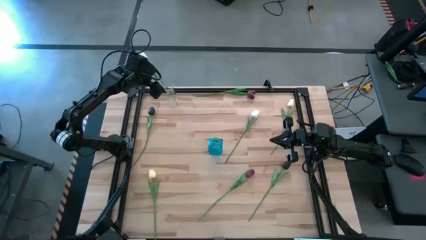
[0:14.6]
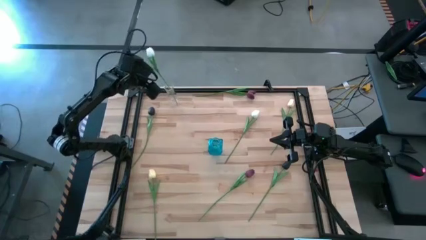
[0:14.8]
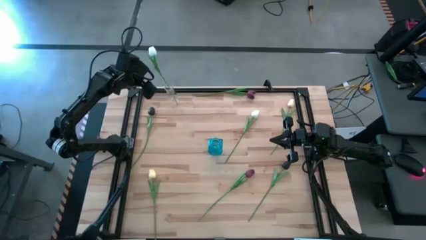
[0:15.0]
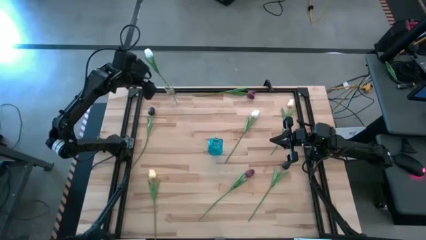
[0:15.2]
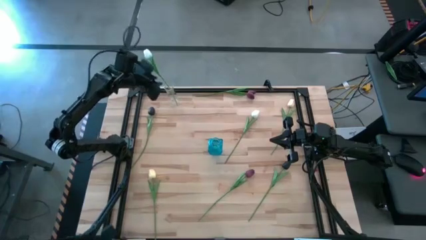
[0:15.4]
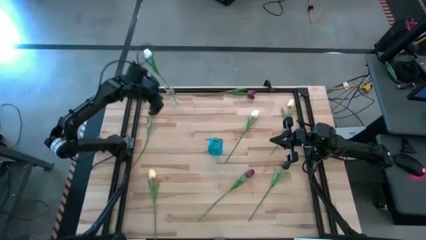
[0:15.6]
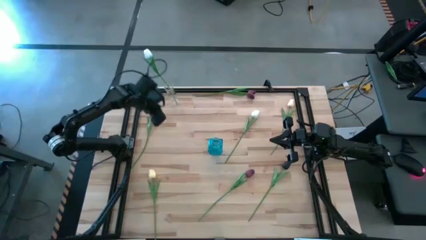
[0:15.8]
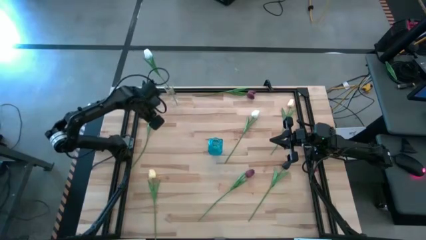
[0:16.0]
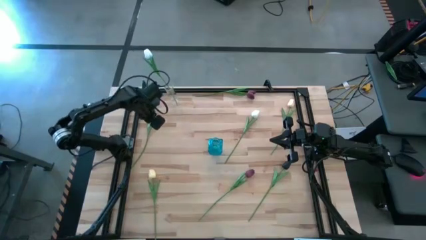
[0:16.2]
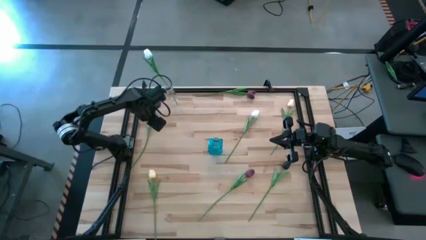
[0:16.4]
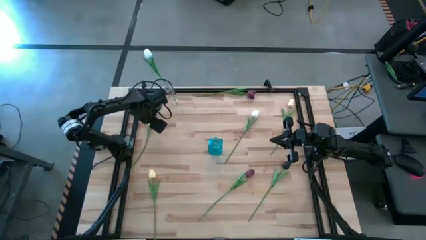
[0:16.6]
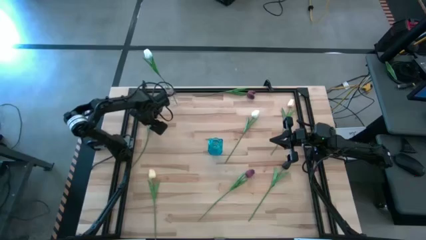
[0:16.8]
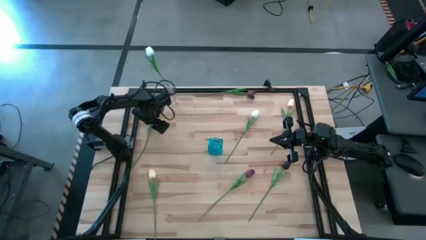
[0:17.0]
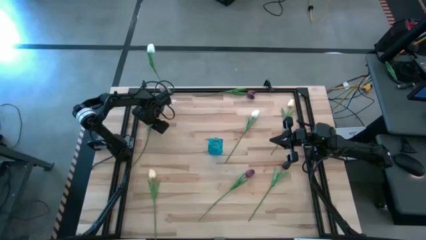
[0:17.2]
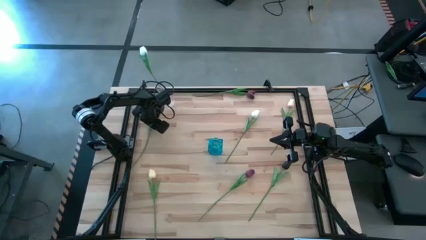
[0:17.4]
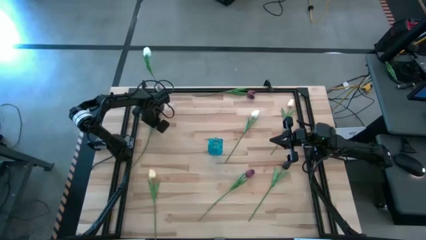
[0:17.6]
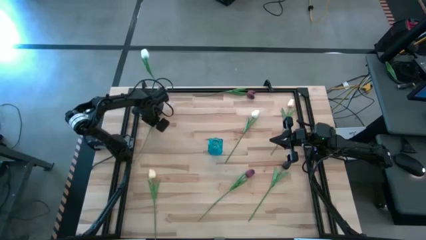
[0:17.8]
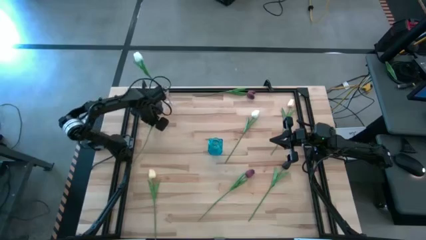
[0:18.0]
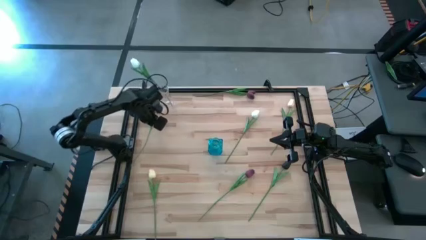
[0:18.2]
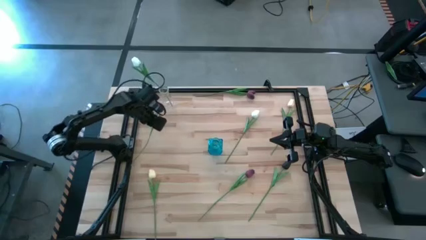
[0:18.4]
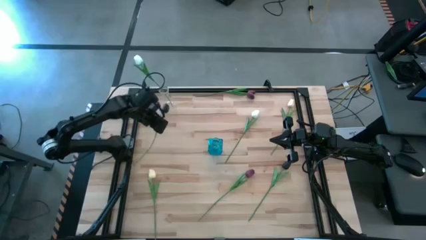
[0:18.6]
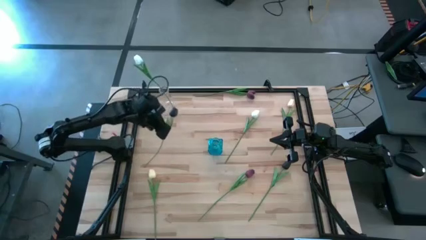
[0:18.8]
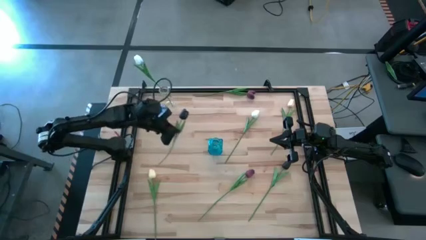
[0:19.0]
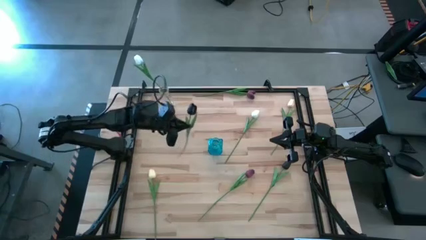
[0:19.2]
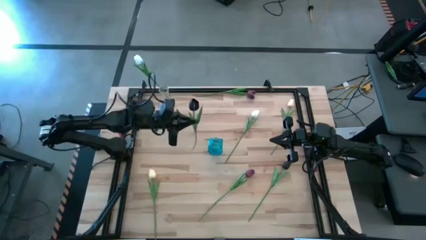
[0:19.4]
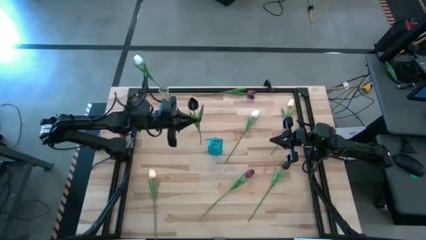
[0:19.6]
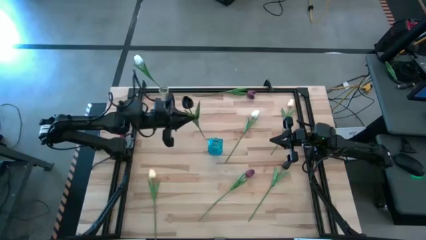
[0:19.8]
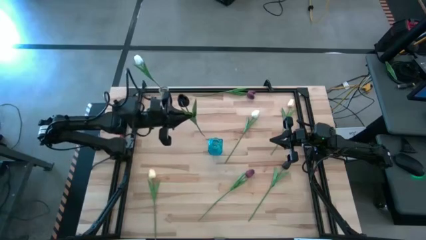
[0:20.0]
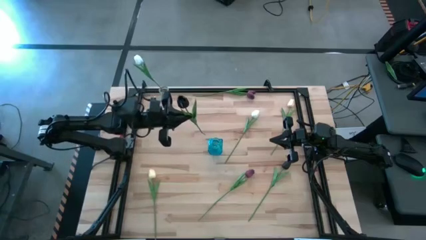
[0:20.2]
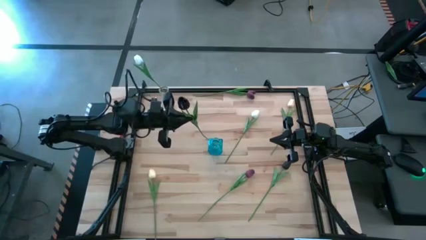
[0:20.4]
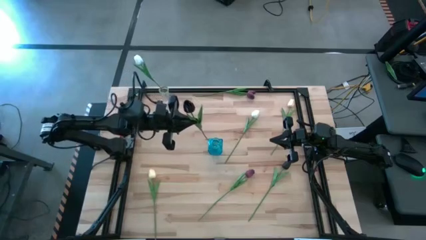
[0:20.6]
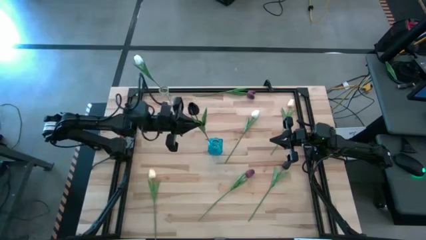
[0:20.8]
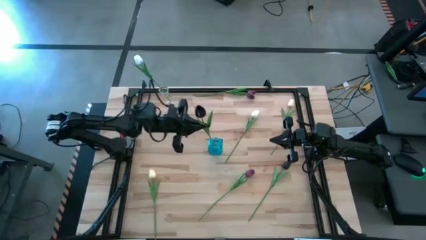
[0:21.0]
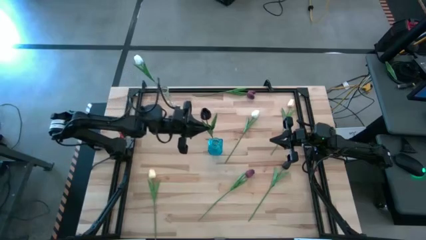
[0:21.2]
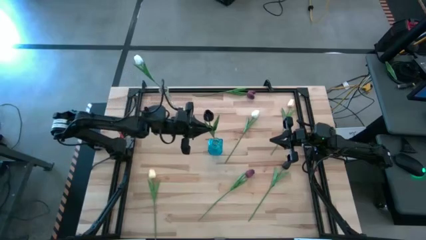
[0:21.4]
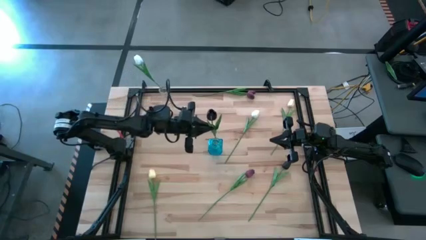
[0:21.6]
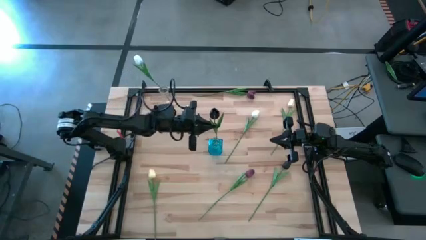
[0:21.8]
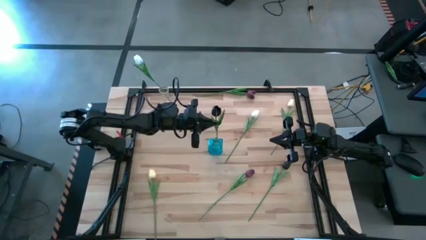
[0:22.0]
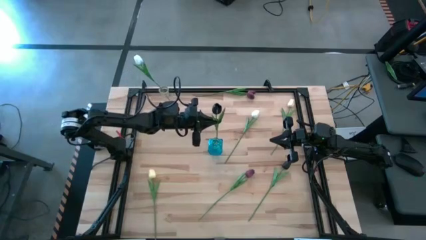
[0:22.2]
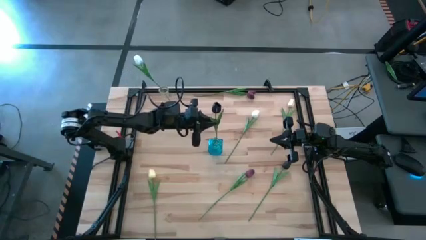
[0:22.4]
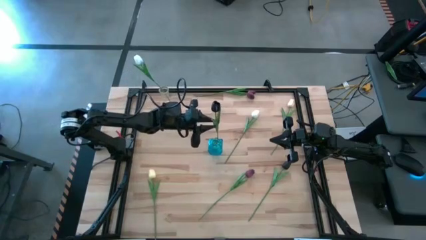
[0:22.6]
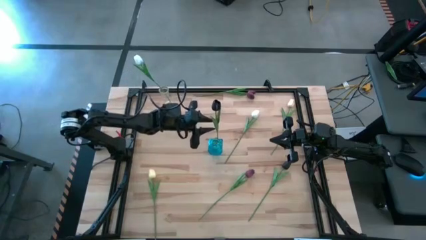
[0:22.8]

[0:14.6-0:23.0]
Task: Sort flowers into vase by color
Put the left black flower into the blue vase

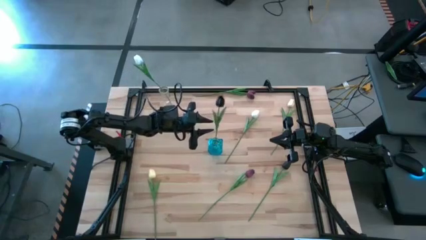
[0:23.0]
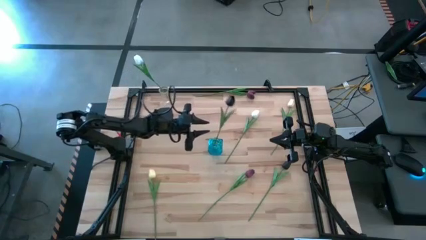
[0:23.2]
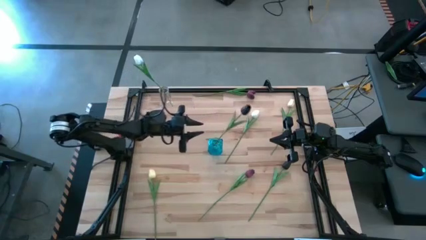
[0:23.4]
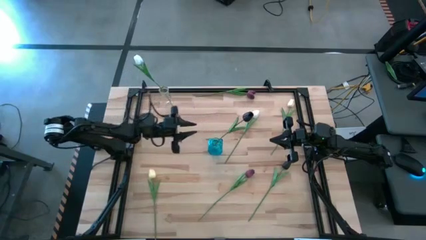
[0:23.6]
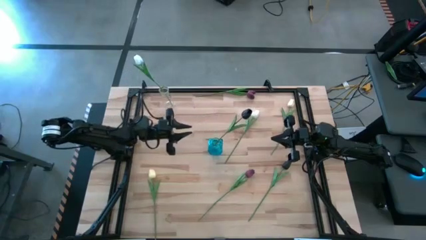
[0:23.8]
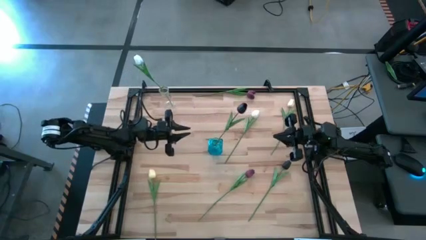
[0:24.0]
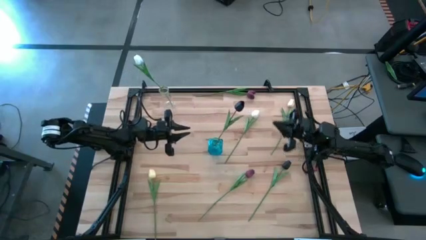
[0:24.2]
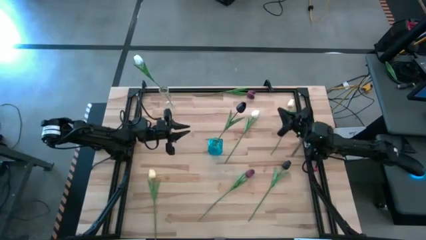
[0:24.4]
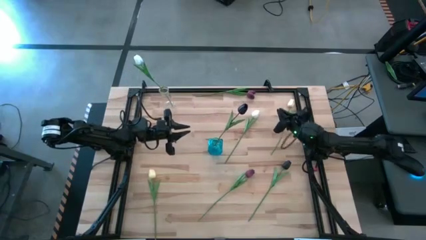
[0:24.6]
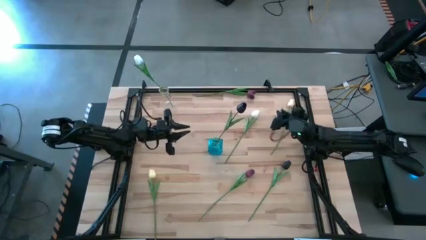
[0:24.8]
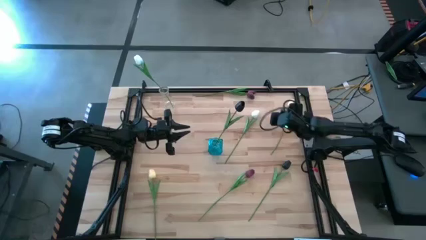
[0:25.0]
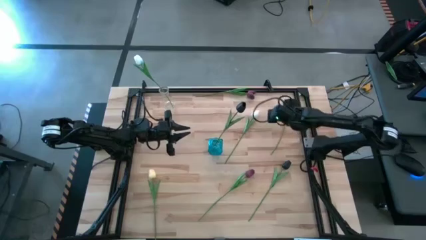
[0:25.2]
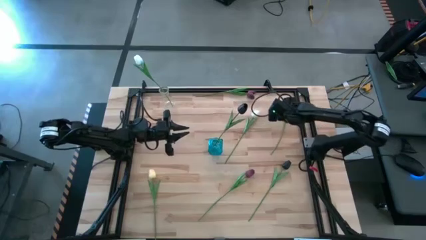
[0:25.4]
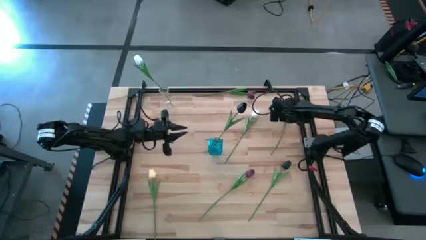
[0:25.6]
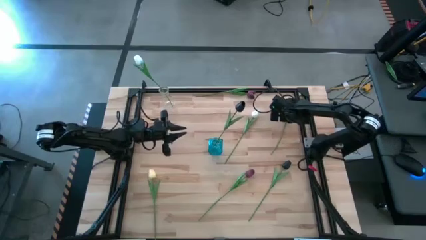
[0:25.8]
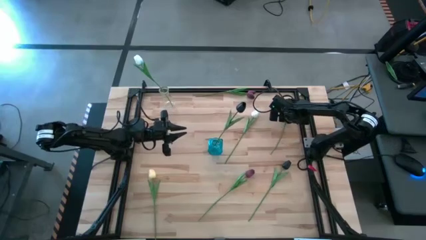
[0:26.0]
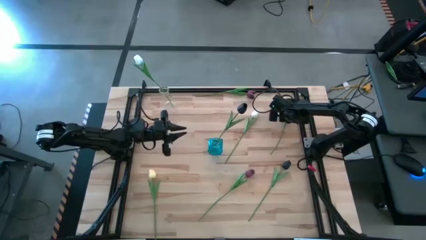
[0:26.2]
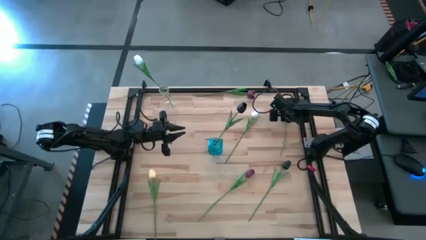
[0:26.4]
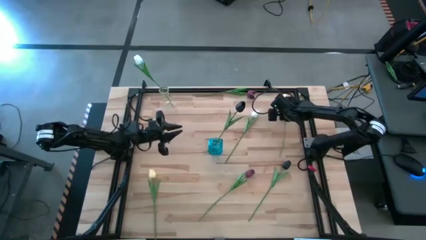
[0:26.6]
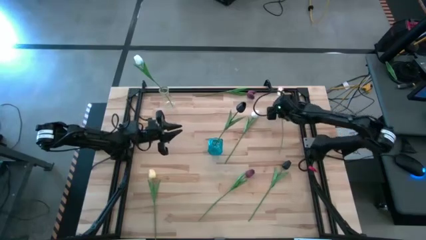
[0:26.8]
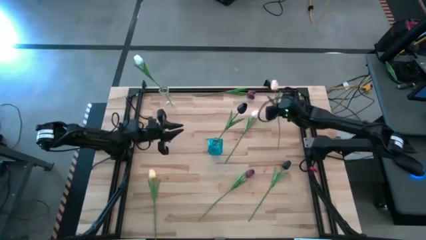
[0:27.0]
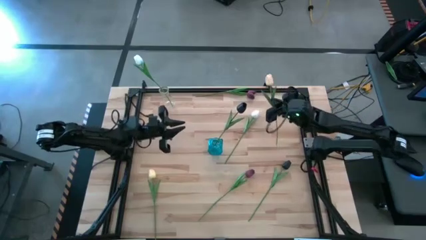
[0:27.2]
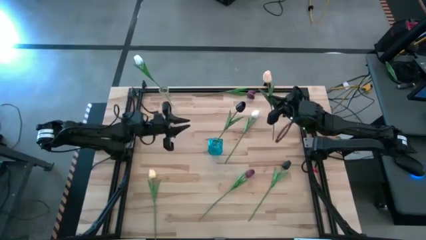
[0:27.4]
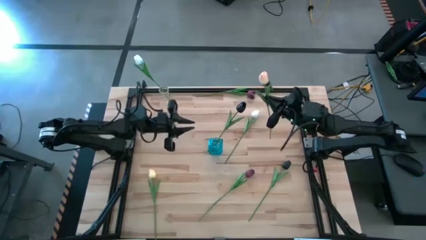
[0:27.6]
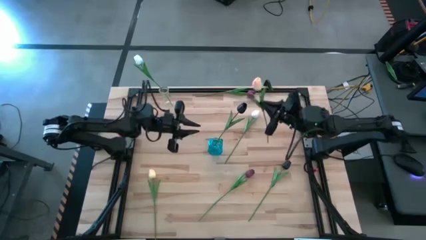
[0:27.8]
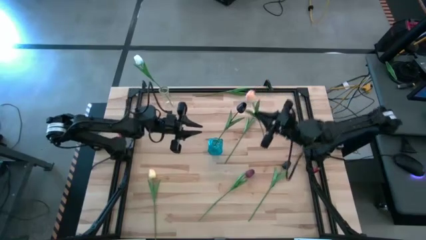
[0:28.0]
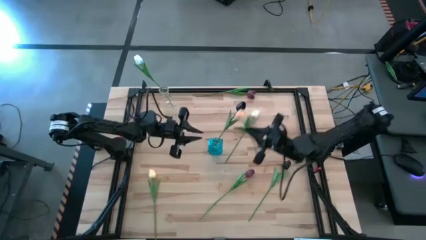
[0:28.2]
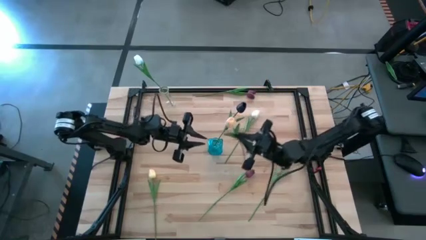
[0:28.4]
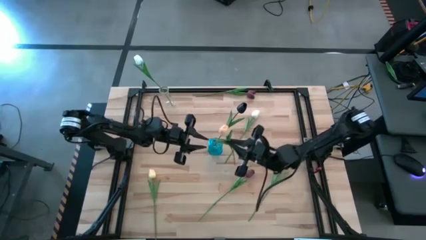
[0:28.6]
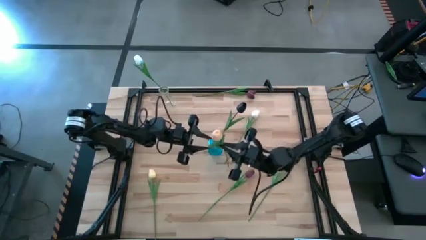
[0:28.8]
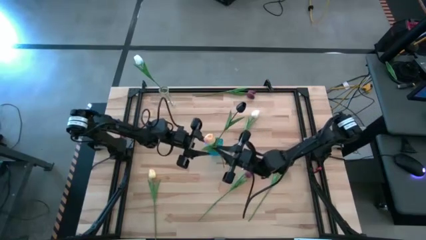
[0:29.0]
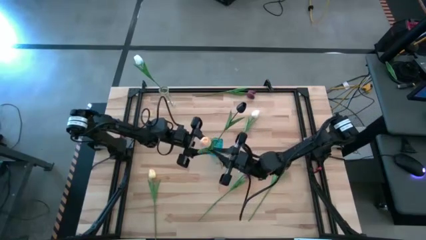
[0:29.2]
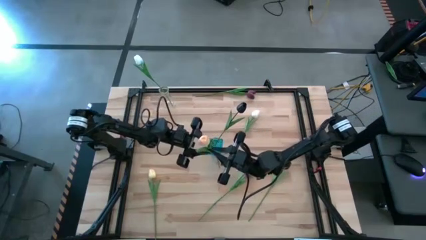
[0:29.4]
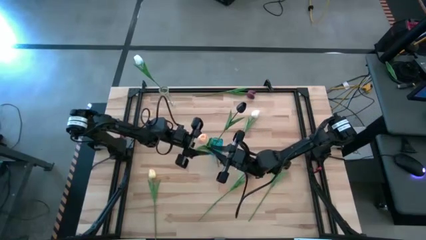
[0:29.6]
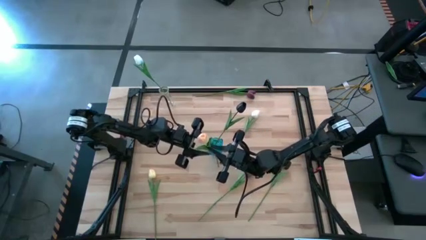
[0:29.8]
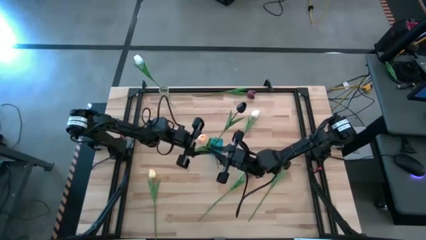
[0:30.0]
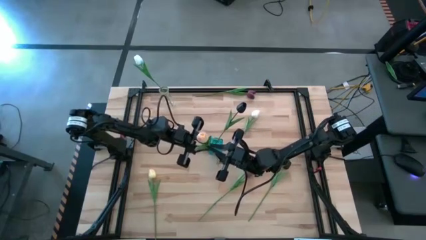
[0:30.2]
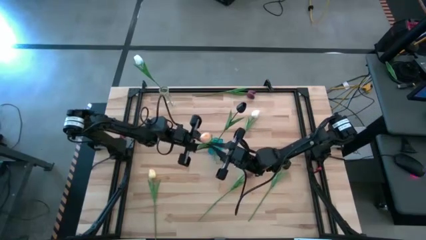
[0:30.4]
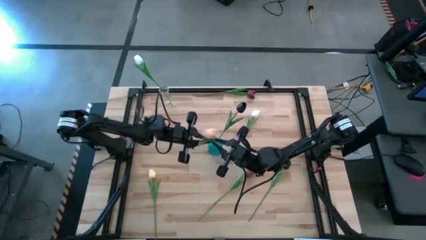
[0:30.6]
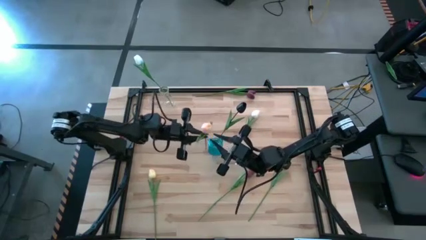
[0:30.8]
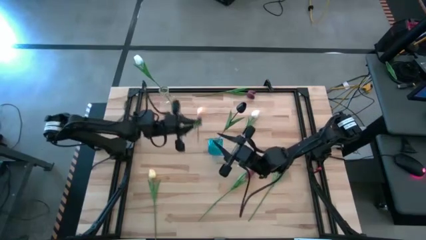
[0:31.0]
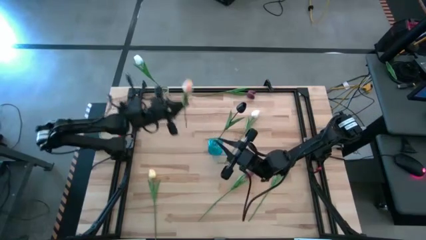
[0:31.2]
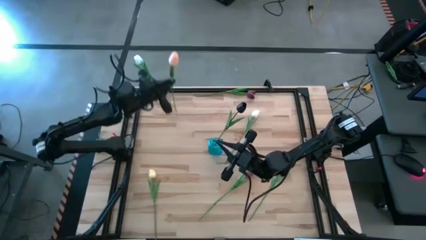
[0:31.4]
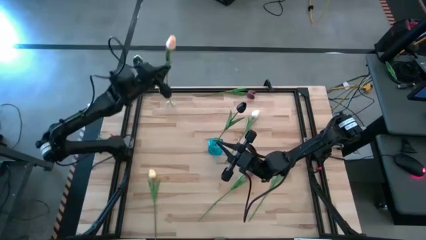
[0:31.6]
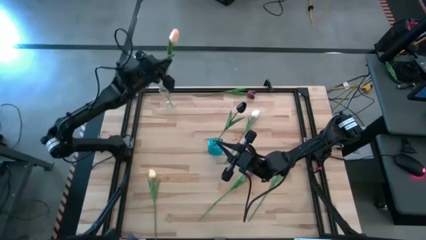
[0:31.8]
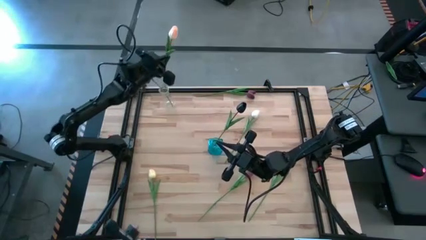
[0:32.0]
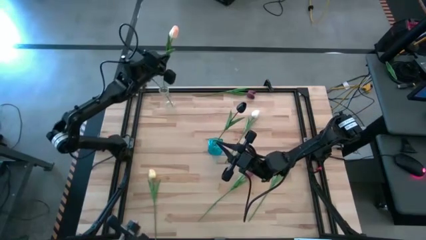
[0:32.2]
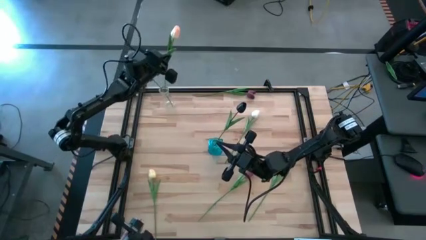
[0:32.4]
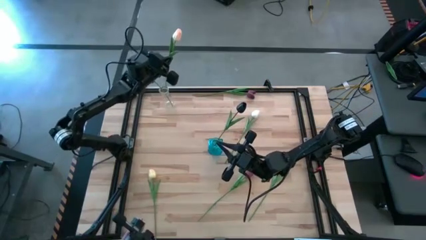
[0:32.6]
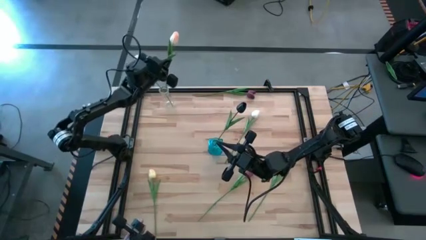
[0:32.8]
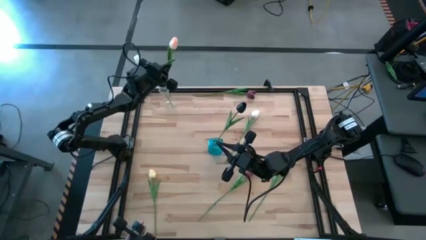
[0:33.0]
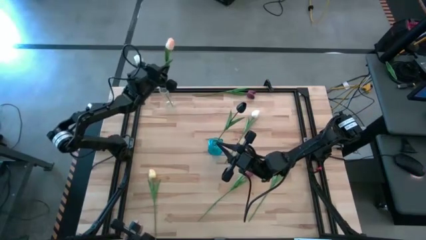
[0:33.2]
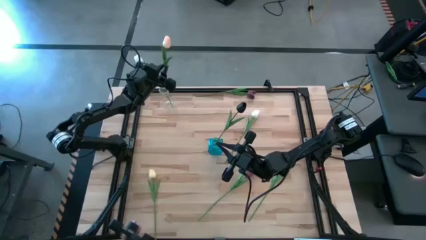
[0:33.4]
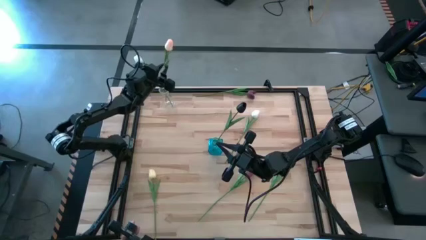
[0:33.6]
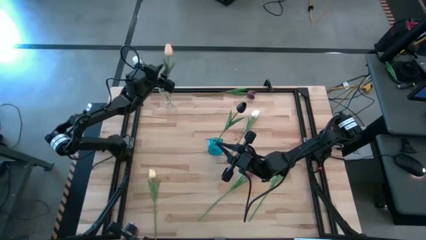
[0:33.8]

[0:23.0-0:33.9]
Put the right orange flower into the transparent vase
